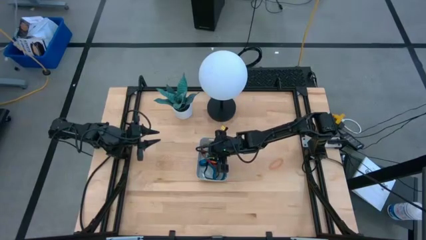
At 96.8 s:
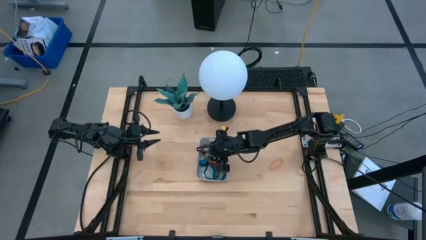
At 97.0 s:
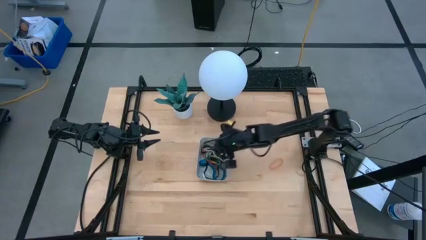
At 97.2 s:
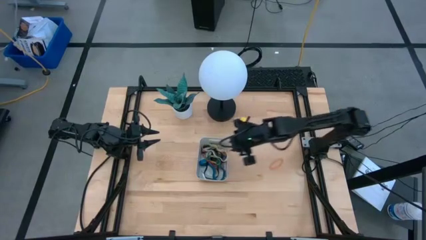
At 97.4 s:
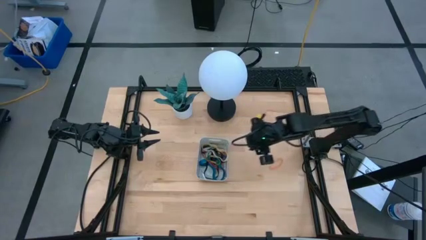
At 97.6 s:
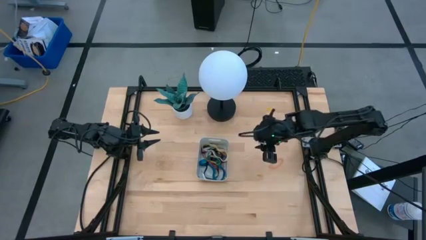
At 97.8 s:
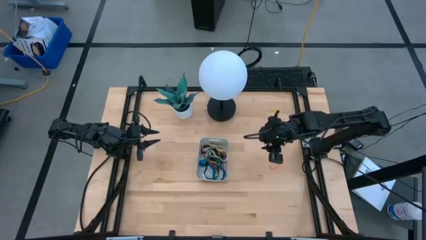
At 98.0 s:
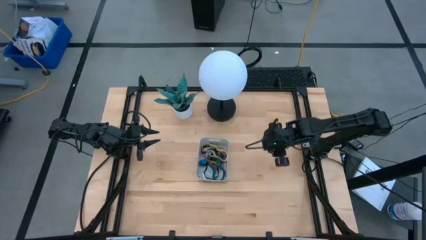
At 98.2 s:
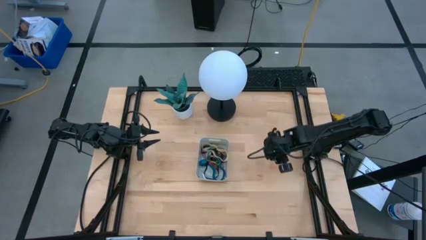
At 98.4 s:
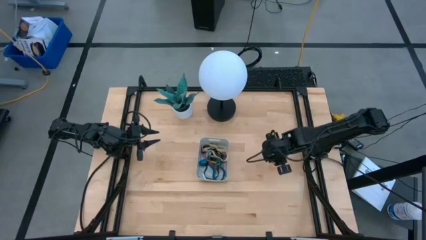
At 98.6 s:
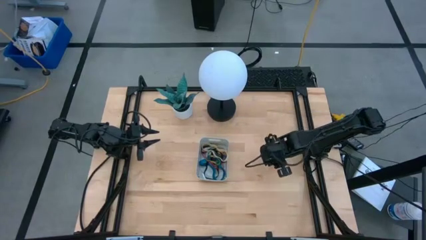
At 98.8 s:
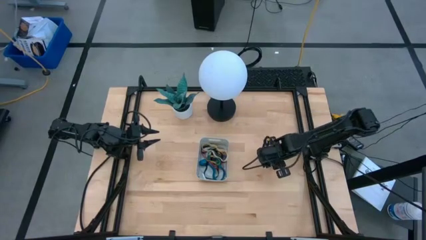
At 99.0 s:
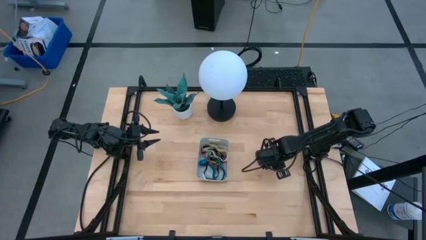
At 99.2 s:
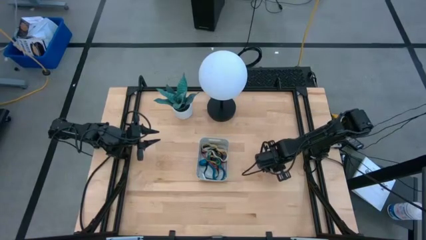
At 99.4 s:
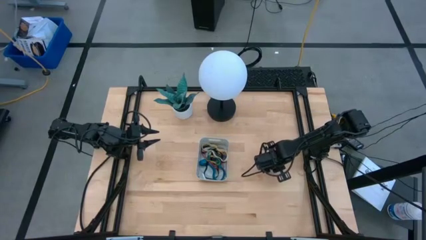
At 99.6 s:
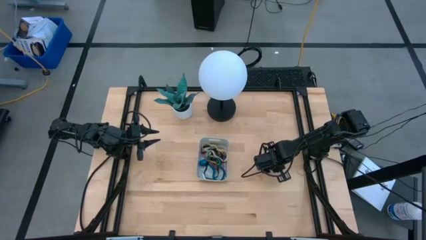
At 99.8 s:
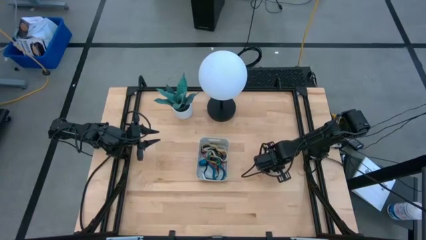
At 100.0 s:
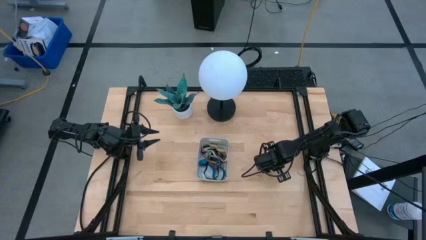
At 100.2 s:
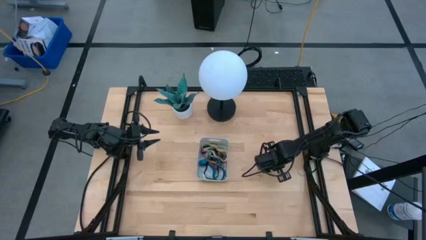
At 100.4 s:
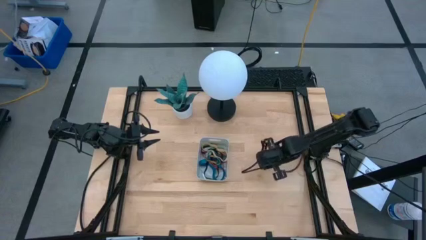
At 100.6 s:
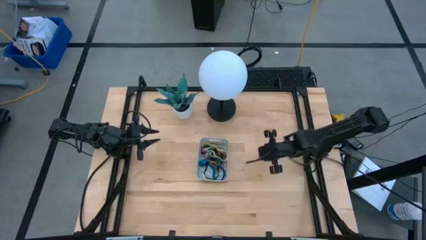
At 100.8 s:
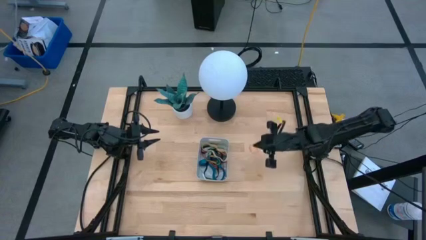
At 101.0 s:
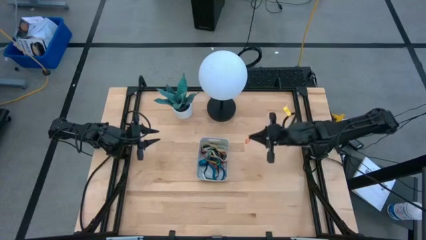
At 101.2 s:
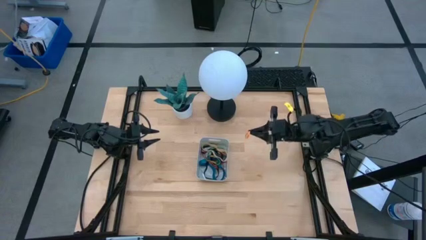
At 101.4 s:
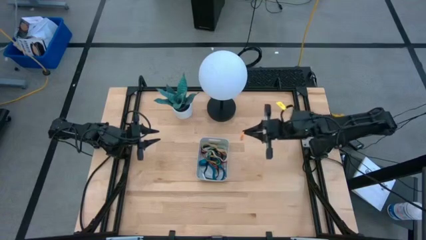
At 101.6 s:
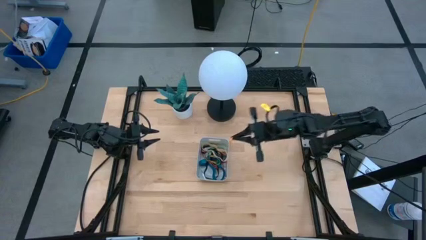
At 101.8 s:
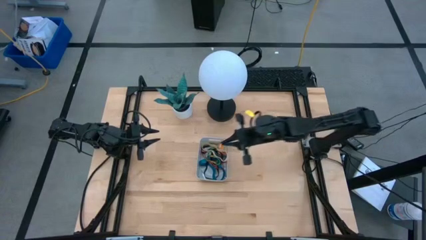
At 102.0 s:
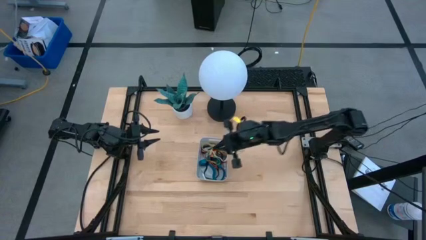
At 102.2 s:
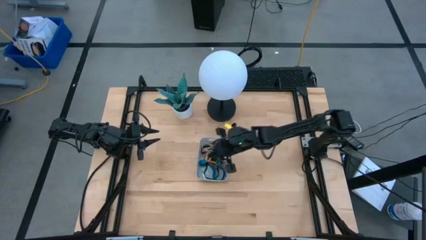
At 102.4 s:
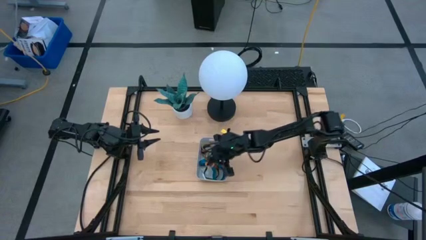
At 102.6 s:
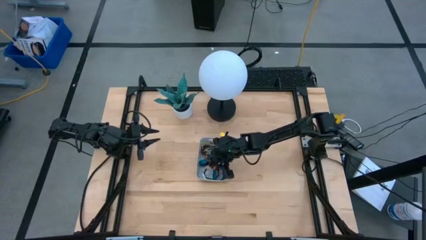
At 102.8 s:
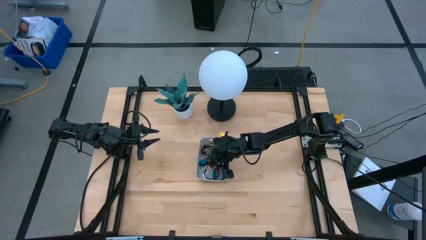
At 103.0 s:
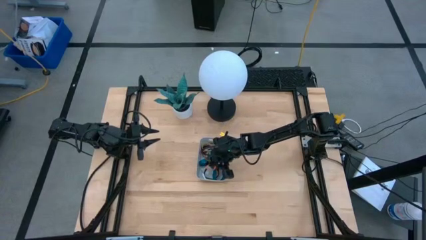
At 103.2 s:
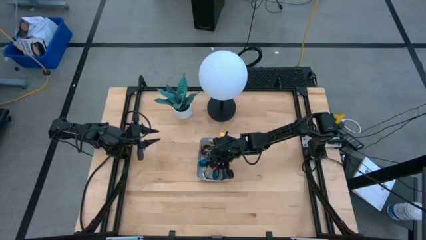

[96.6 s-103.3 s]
Task: Pick and place rubber bands into bin
Put the orange rubber band into the gray bin

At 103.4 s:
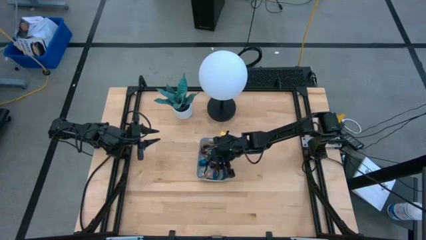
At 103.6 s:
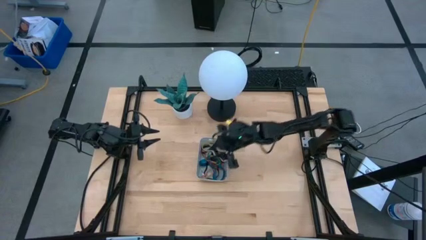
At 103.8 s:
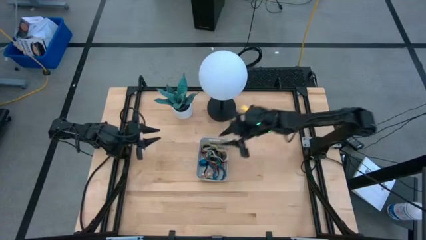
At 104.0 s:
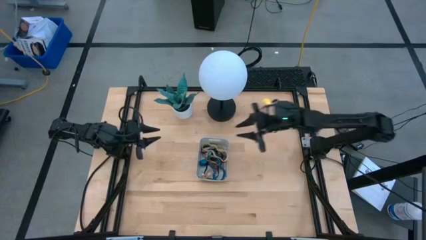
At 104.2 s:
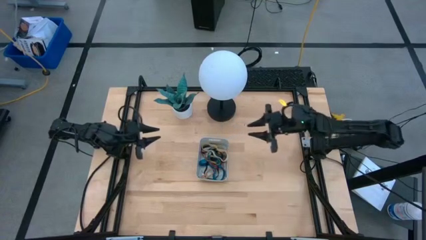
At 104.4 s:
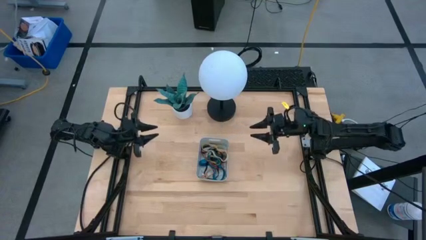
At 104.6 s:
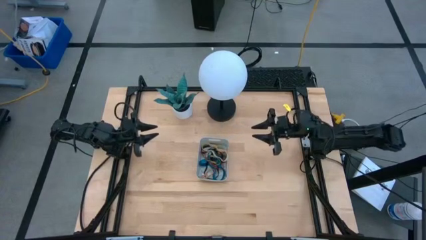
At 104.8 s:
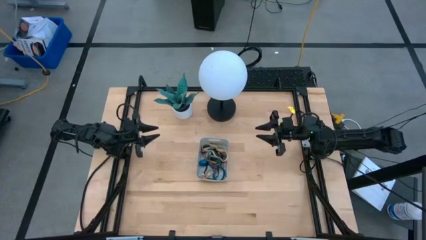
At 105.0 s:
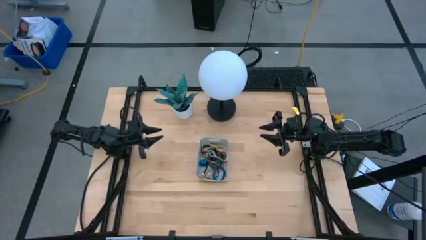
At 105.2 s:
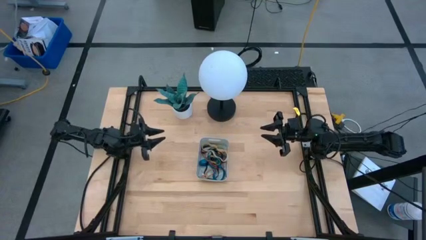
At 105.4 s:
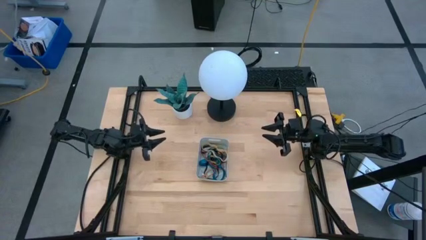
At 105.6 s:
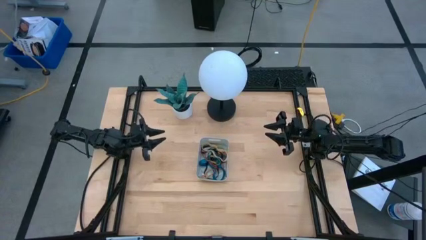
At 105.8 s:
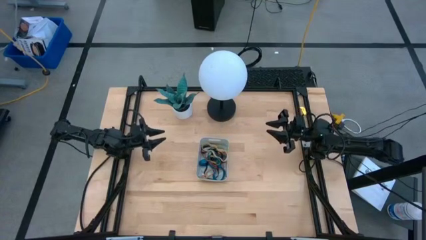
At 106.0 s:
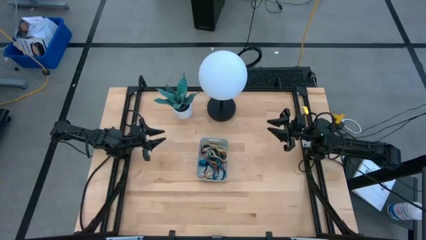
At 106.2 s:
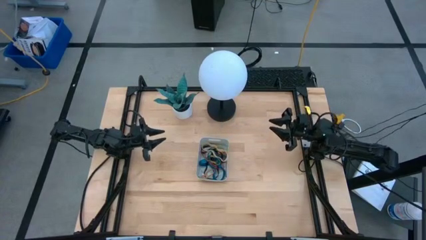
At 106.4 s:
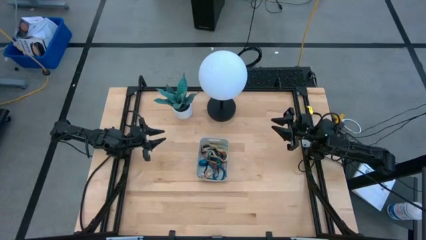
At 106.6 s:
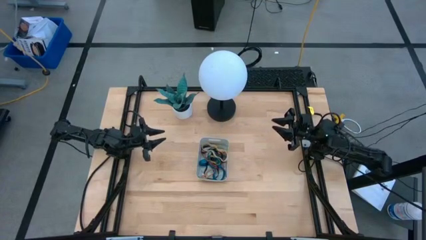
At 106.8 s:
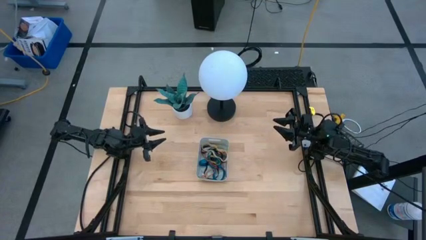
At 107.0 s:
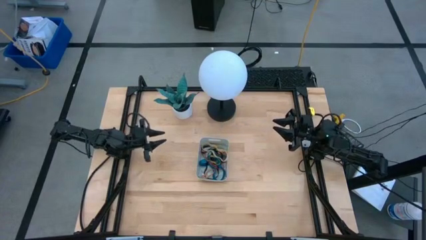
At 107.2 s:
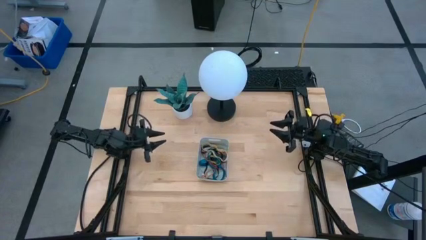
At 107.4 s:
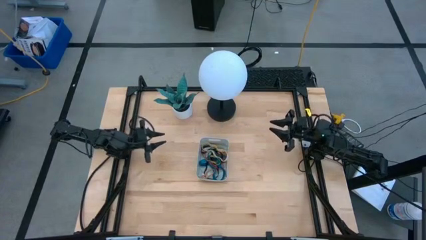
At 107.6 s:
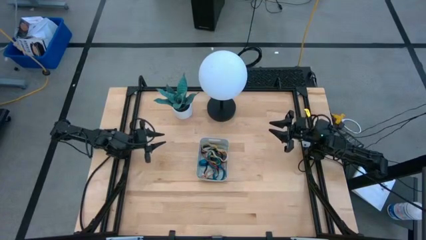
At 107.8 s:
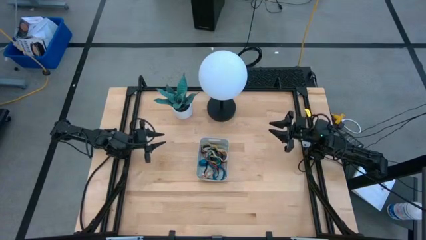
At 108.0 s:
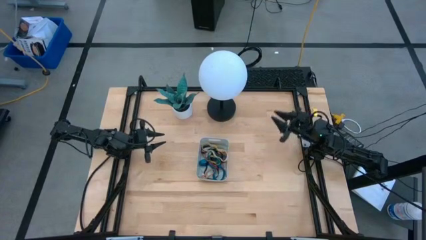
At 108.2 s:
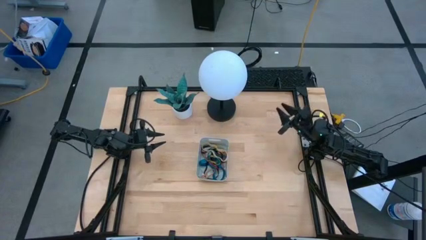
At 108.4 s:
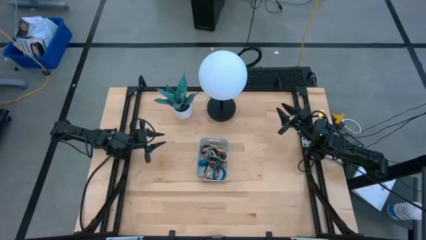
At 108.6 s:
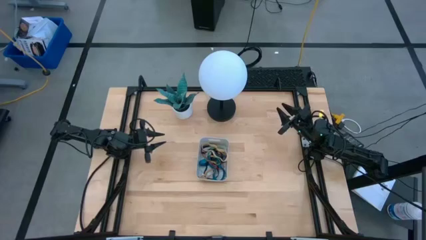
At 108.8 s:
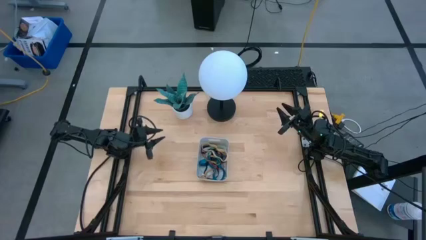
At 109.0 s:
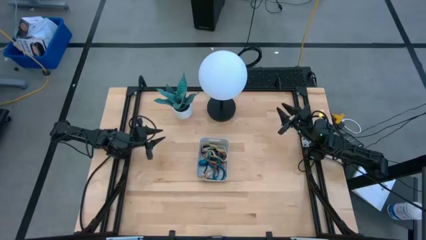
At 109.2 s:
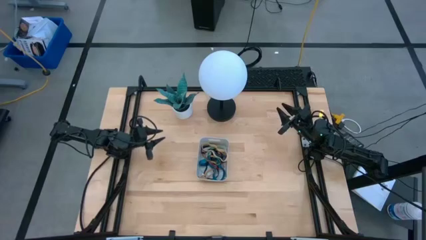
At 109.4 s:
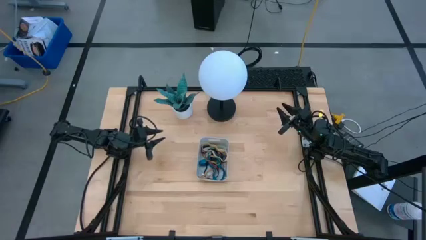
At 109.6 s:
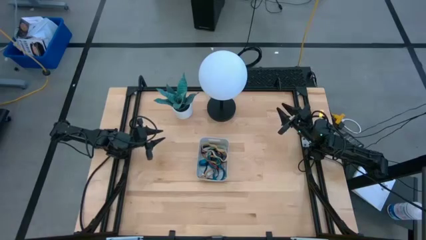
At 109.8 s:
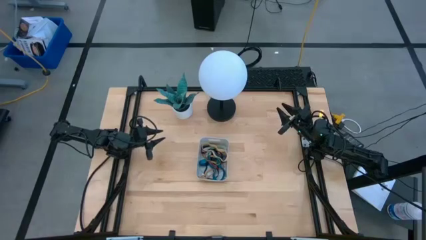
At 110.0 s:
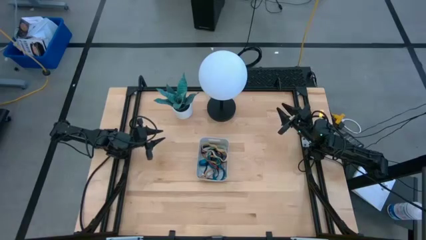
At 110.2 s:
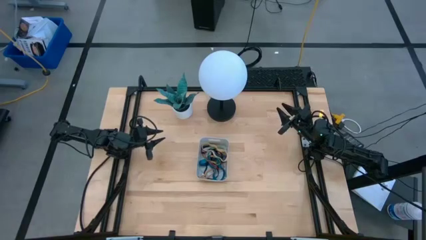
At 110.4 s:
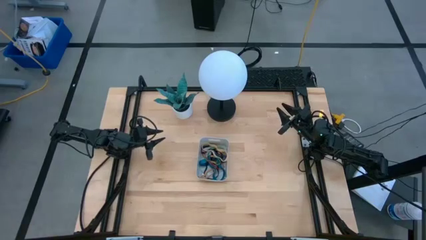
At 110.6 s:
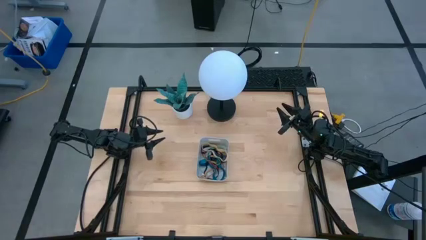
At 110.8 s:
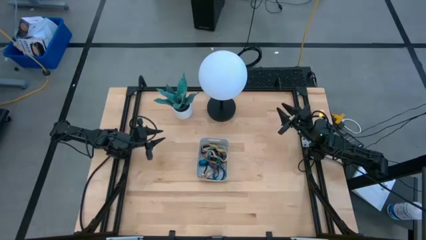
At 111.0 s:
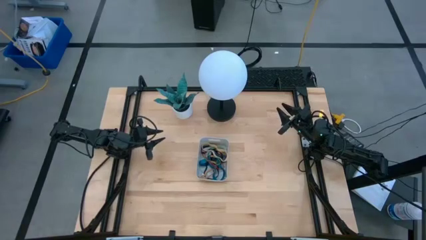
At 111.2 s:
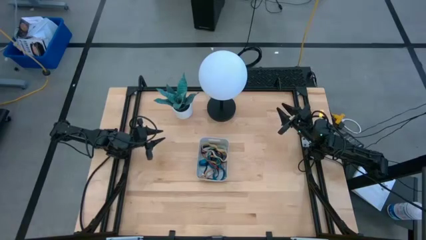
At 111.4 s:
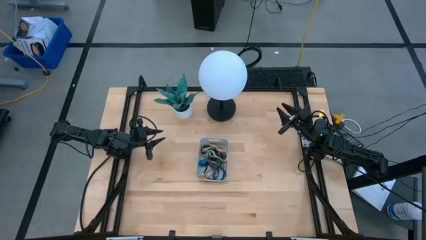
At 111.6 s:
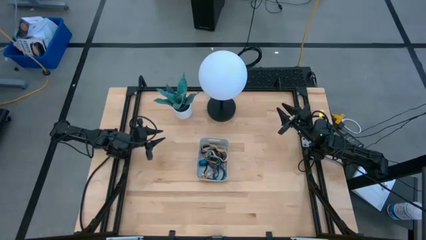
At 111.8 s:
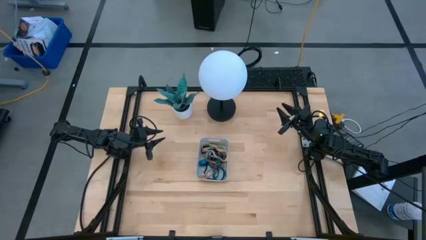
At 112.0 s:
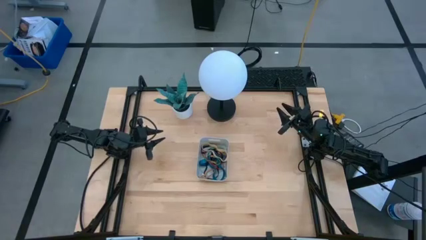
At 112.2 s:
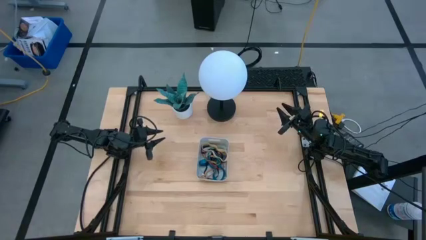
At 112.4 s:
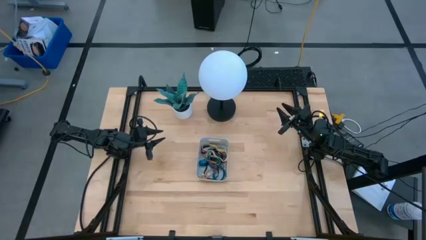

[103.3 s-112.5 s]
Return to Home Position
